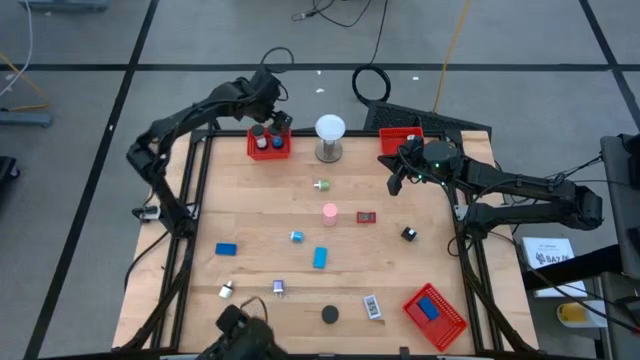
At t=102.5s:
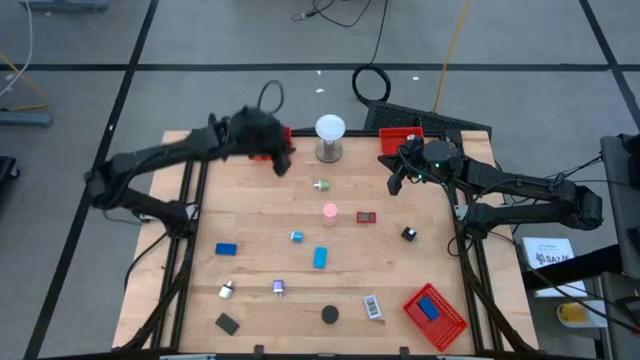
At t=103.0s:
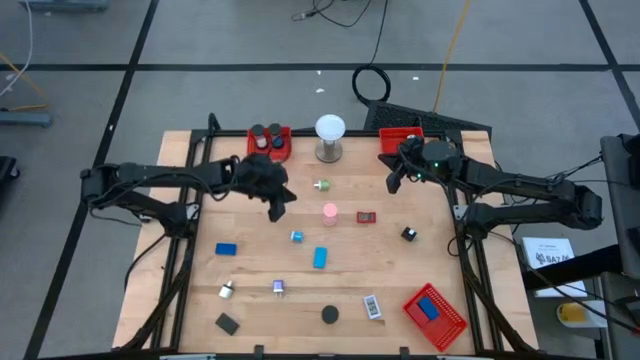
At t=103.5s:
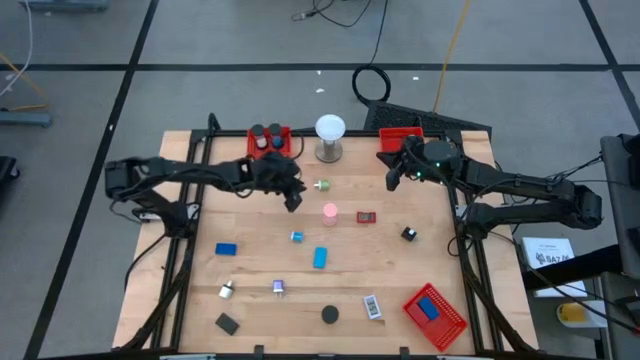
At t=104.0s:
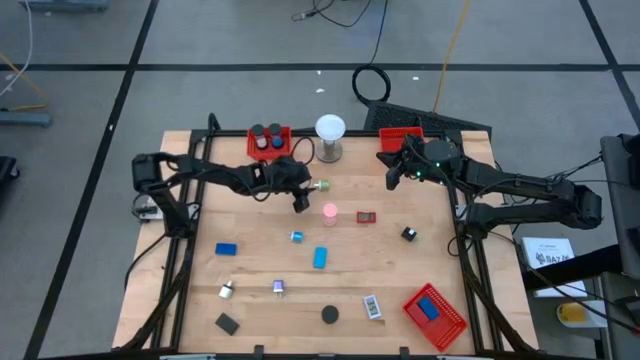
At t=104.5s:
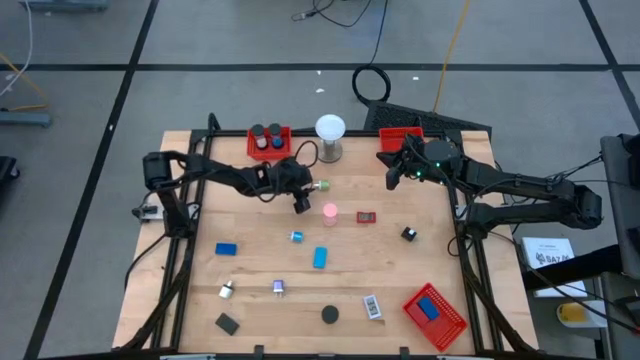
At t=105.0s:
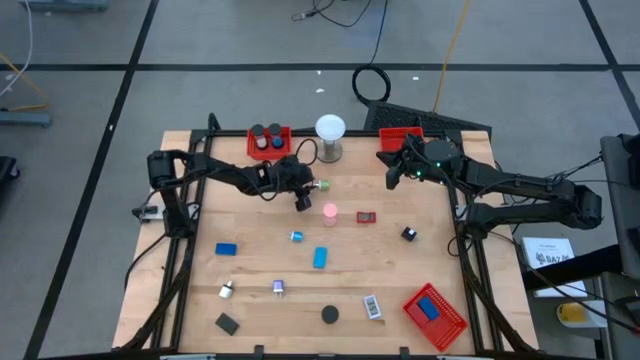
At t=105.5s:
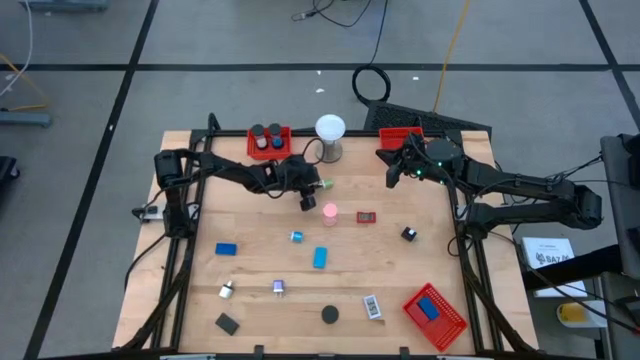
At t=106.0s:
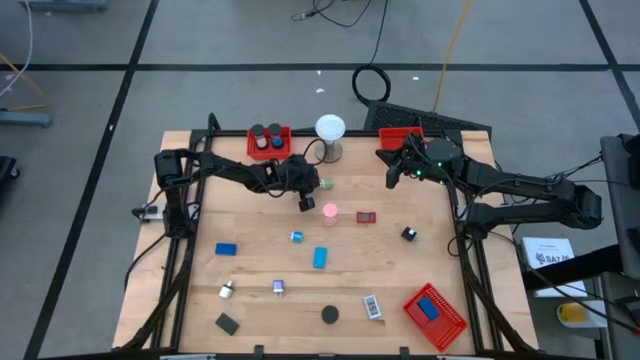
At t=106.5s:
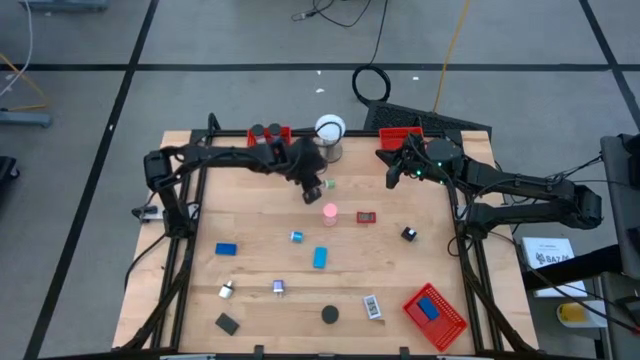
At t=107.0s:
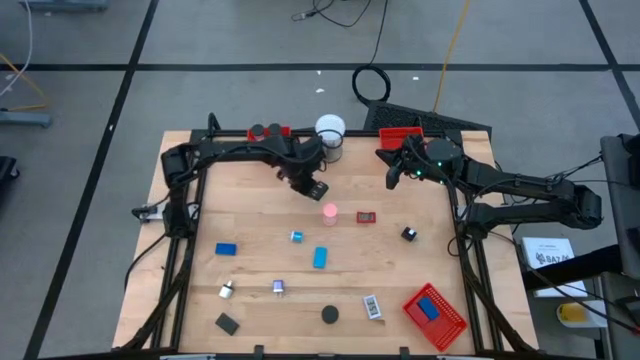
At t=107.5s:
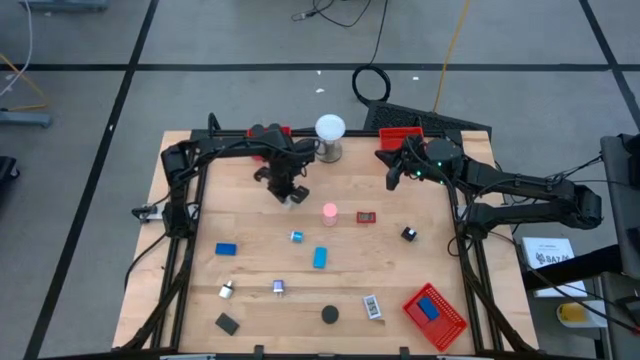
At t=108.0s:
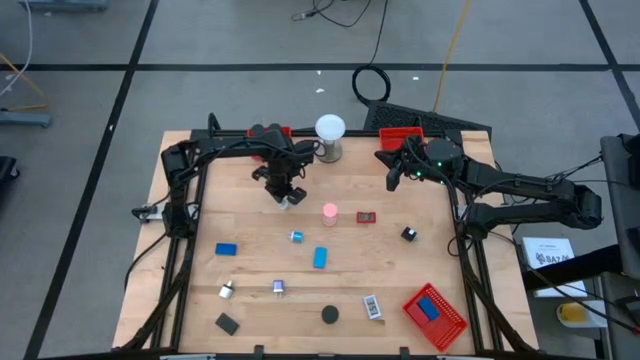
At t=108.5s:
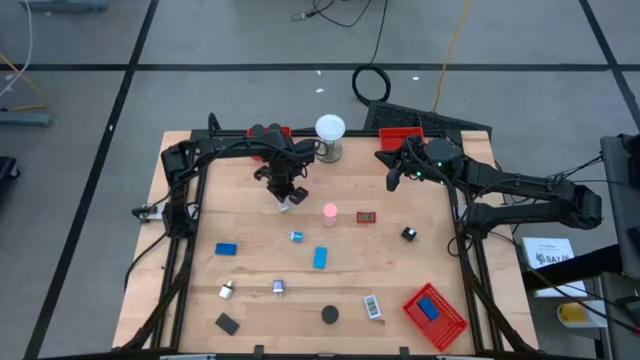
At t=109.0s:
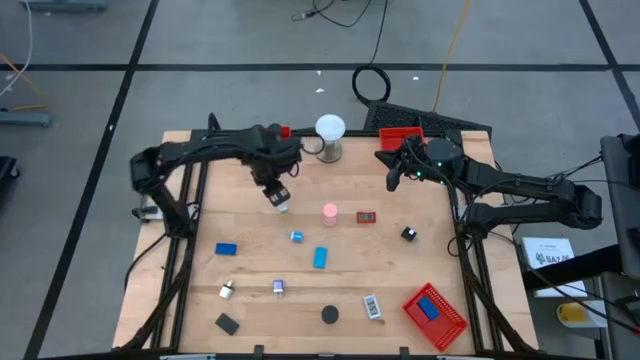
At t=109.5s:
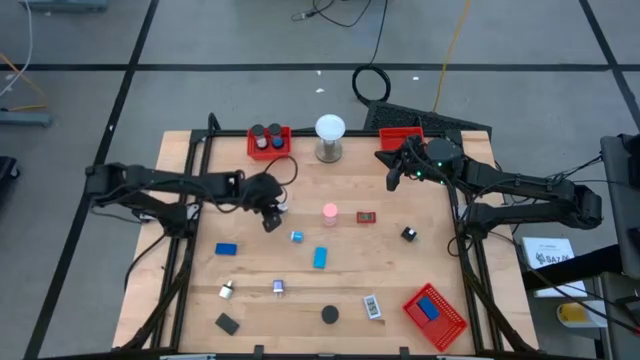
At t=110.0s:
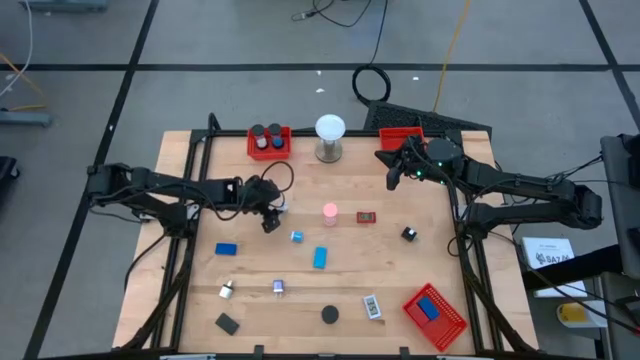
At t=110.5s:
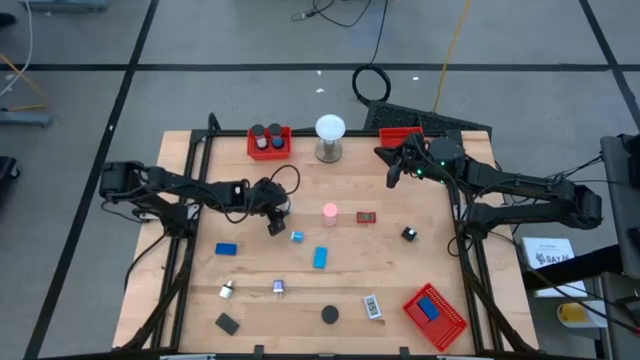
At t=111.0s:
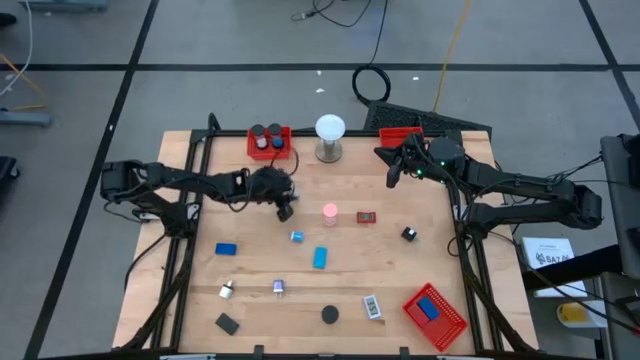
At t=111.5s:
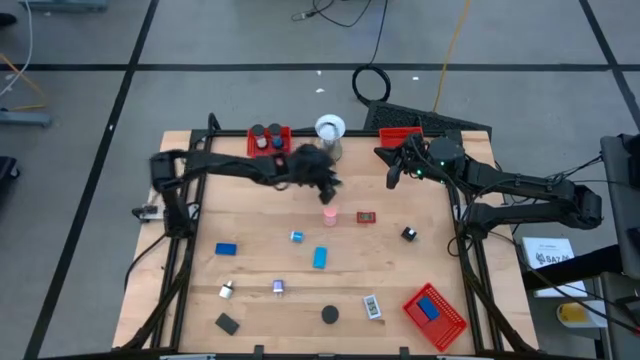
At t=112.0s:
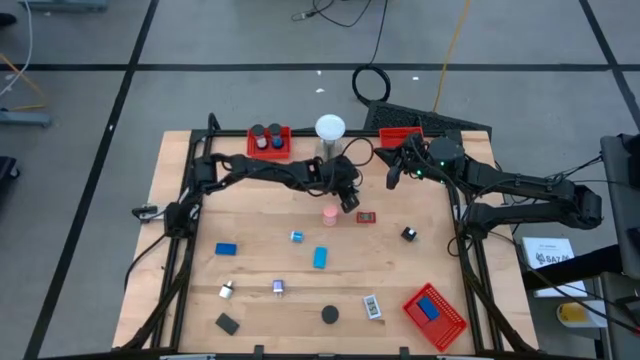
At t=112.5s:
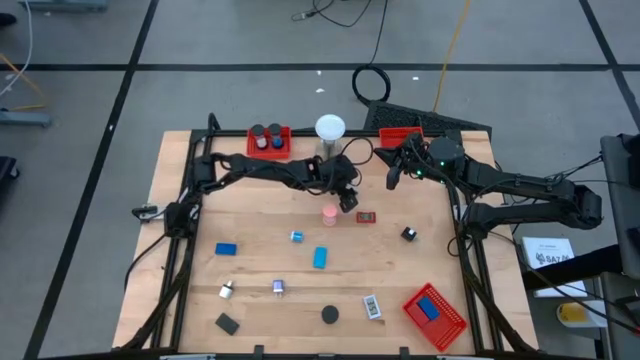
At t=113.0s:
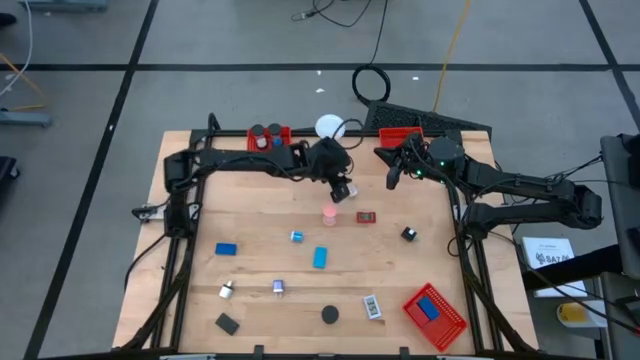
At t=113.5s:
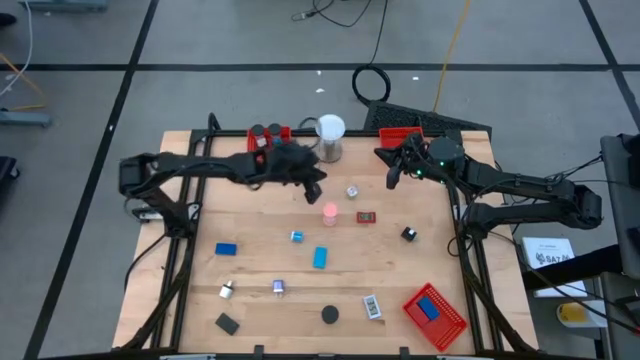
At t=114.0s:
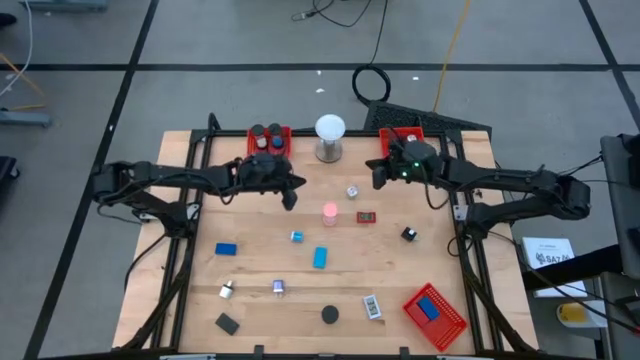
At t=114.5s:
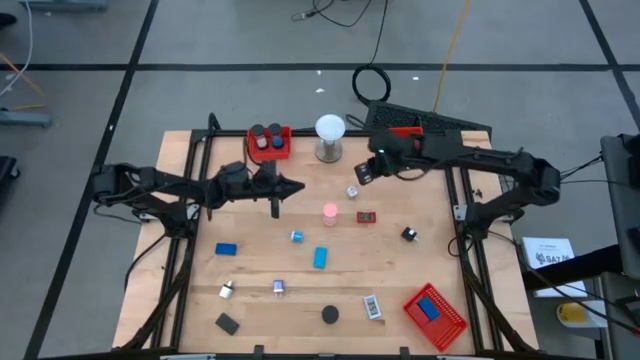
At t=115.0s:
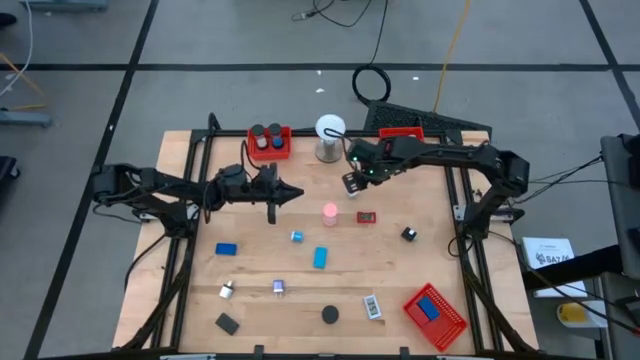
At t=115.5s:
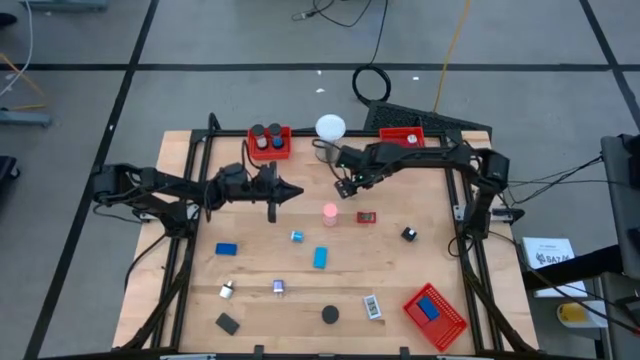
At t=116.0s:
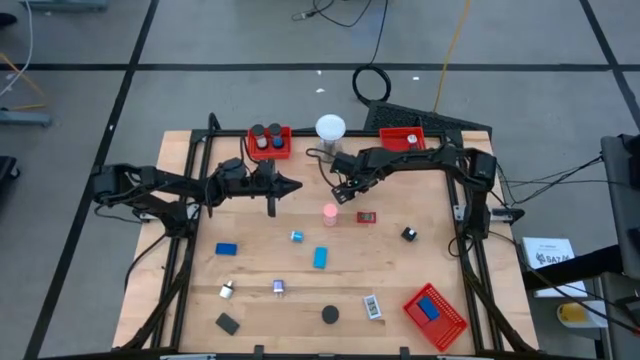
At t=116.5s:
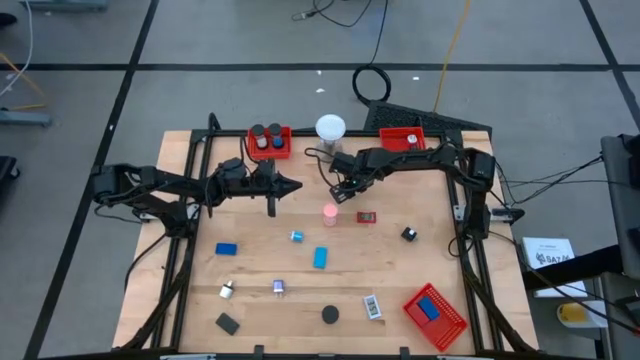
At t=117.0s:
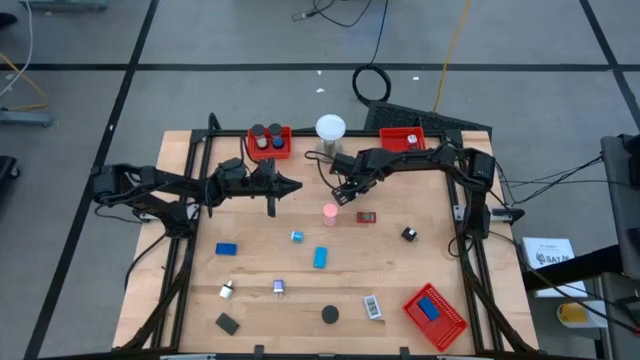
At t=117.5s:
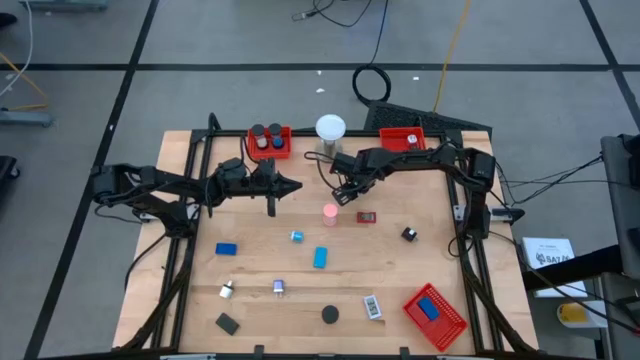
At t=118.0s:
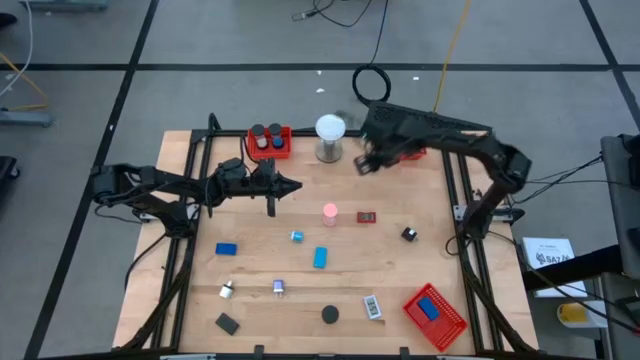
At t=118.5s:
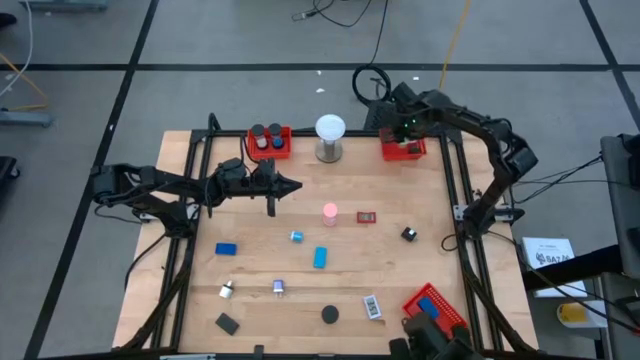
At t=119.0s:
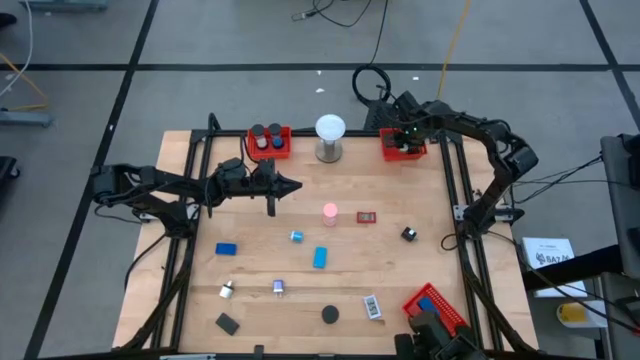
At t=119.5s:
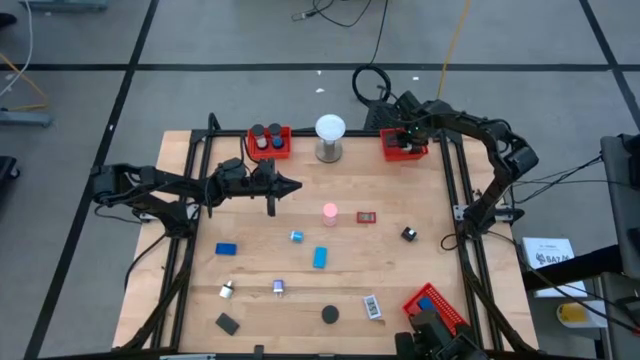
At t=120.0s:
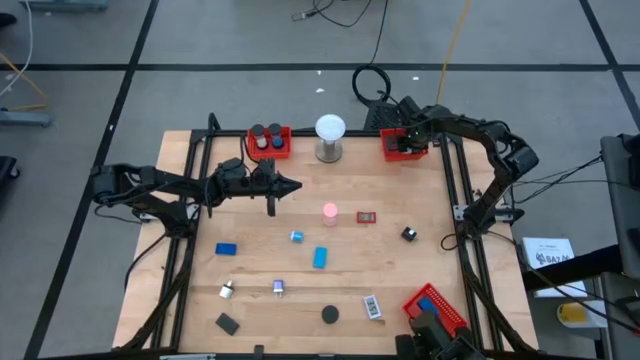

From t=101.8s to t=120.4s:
Task: Pick & Place Office items
Put the green charger adapter into the top right red bin
